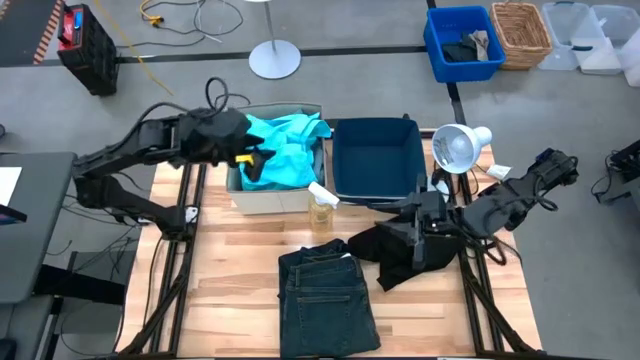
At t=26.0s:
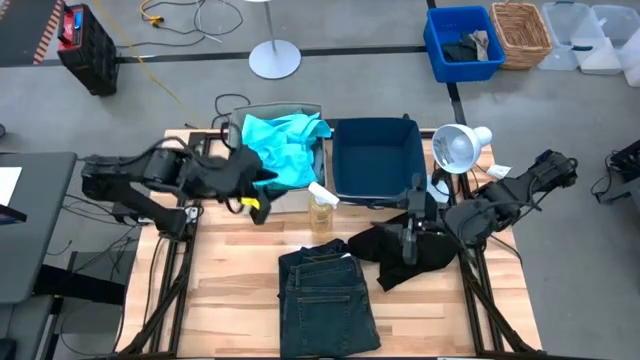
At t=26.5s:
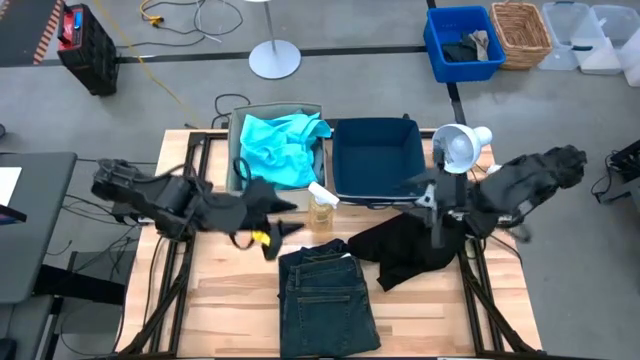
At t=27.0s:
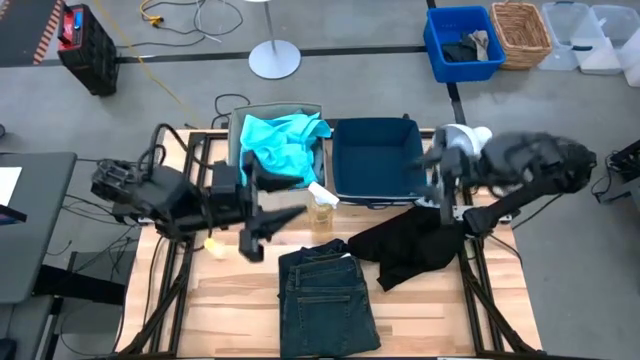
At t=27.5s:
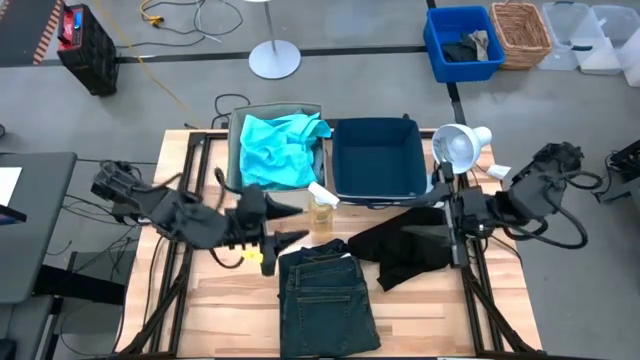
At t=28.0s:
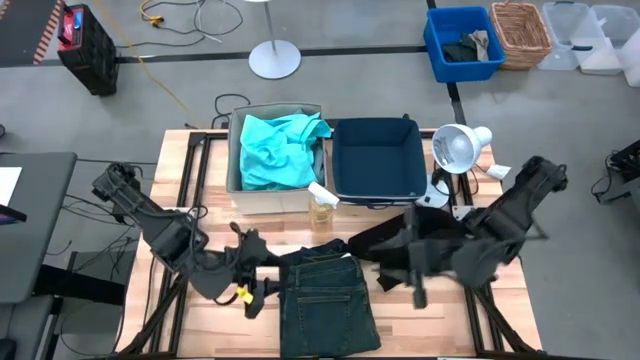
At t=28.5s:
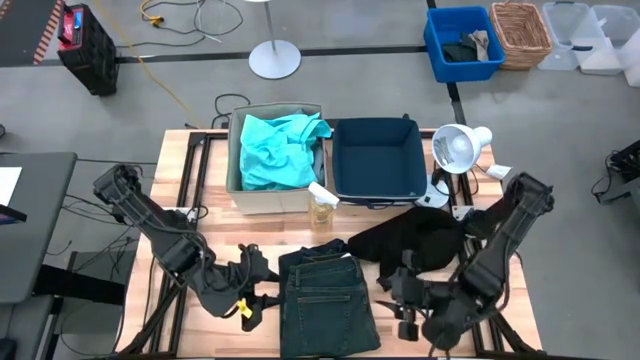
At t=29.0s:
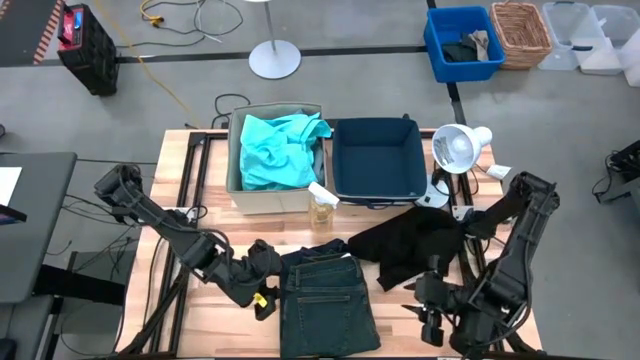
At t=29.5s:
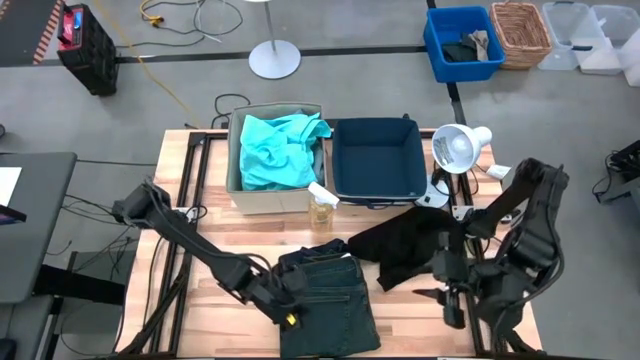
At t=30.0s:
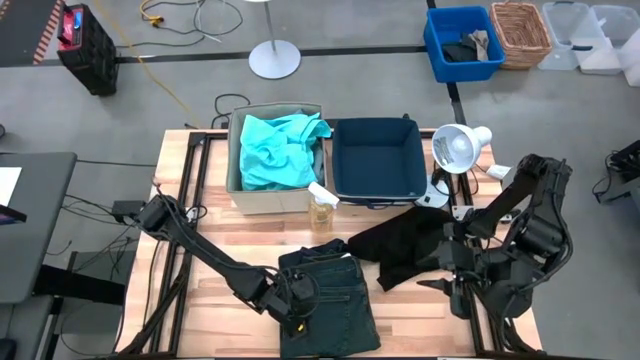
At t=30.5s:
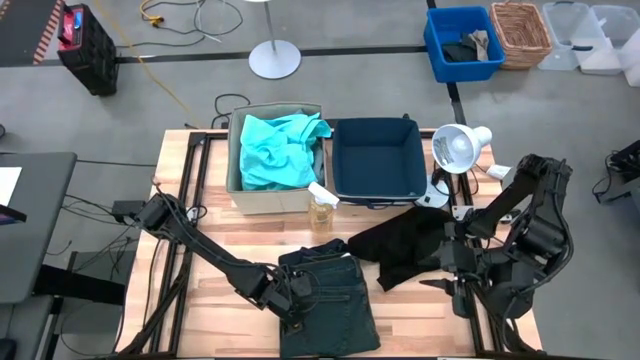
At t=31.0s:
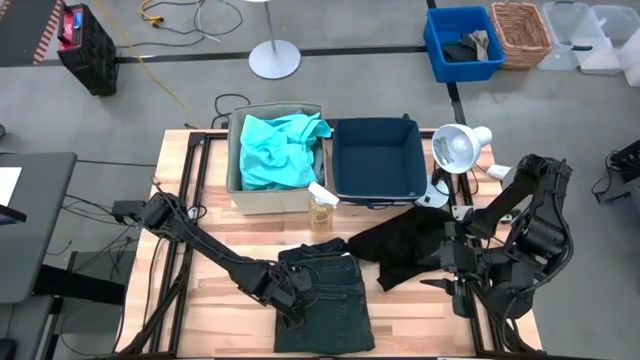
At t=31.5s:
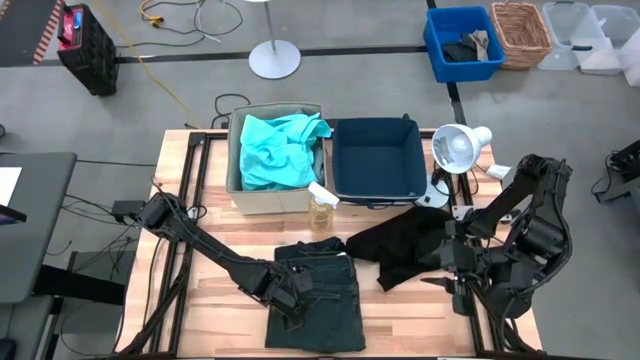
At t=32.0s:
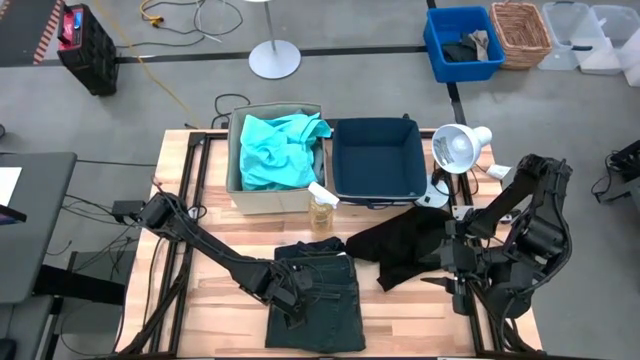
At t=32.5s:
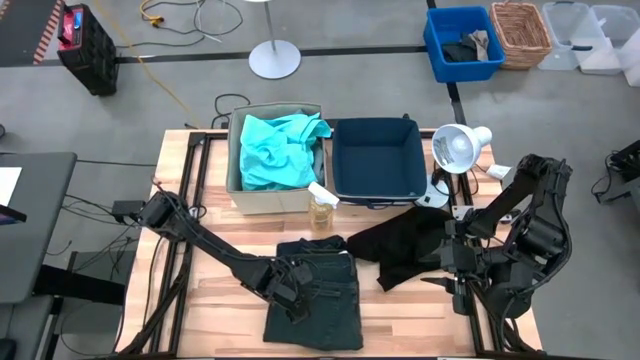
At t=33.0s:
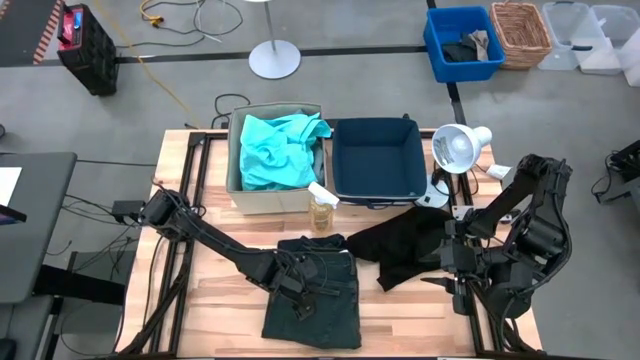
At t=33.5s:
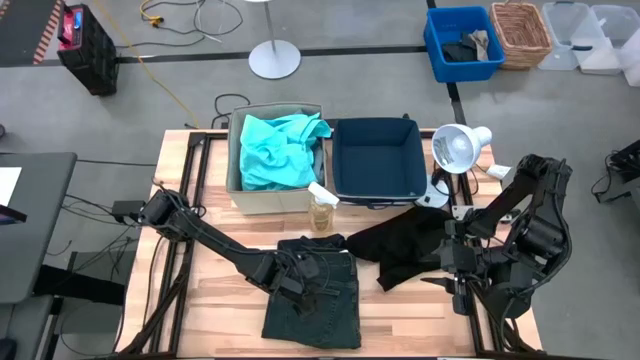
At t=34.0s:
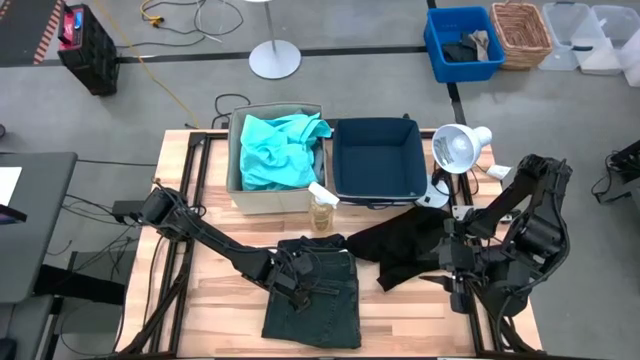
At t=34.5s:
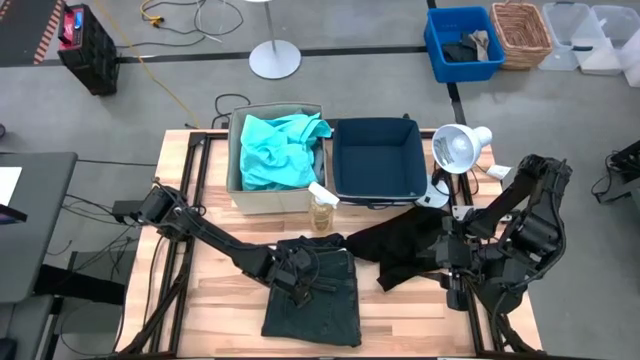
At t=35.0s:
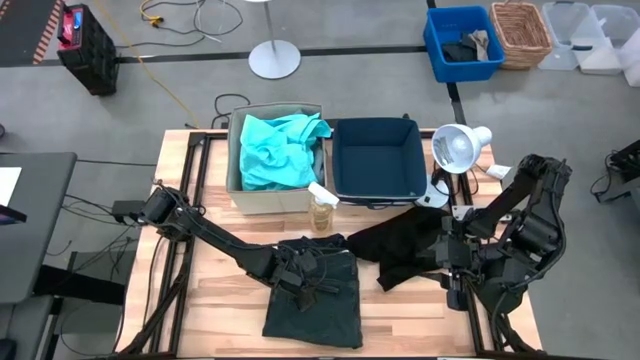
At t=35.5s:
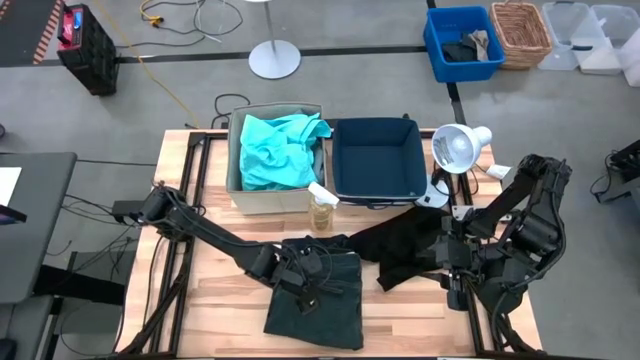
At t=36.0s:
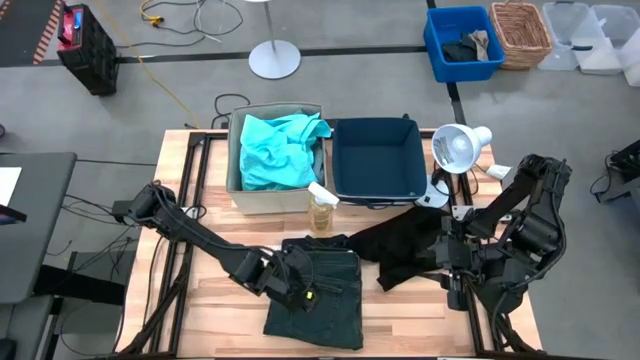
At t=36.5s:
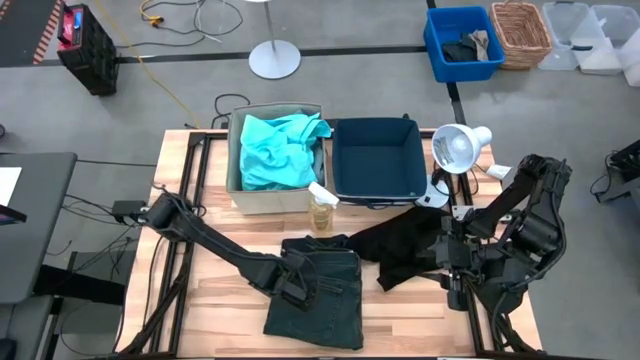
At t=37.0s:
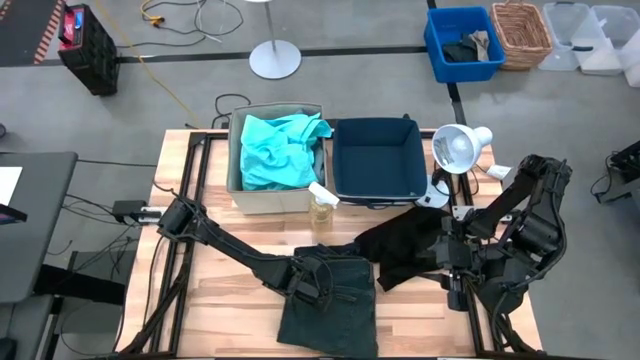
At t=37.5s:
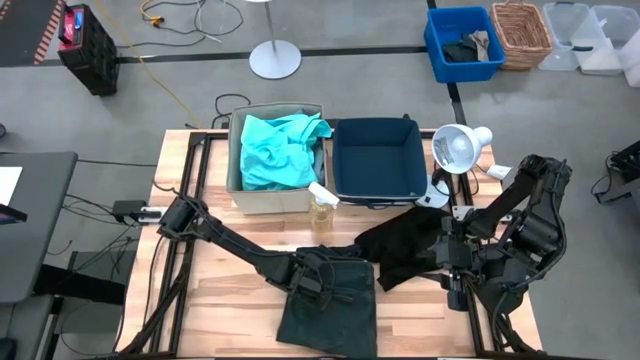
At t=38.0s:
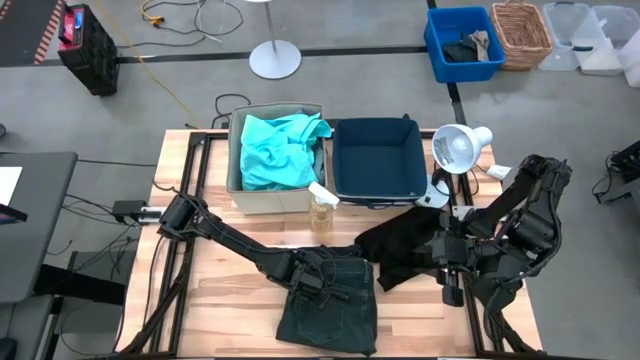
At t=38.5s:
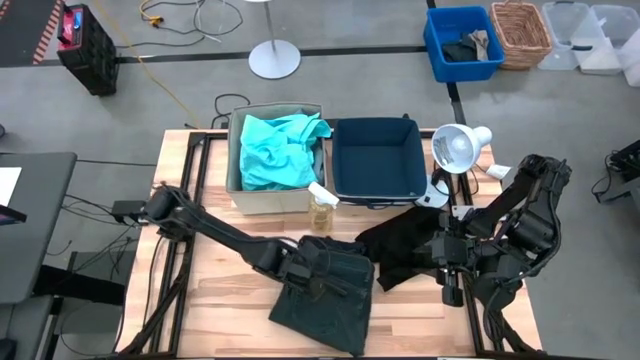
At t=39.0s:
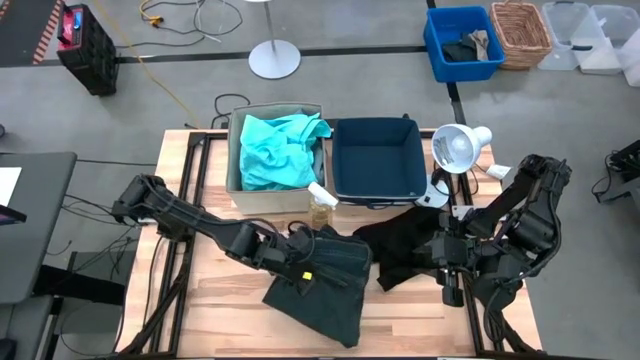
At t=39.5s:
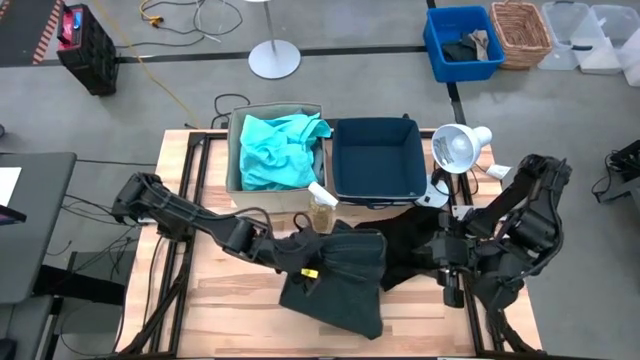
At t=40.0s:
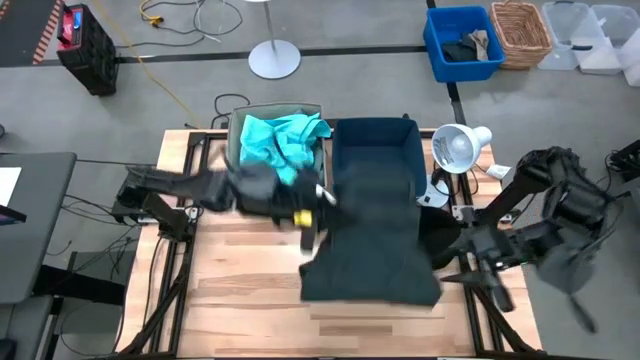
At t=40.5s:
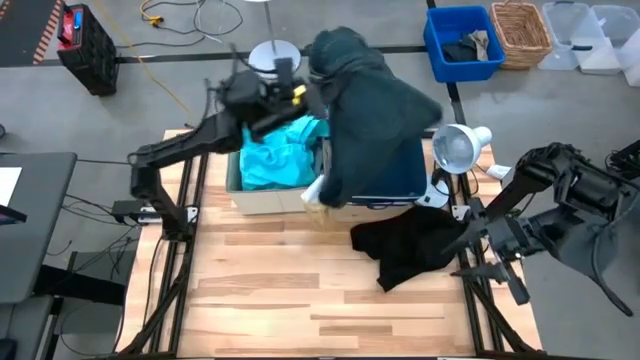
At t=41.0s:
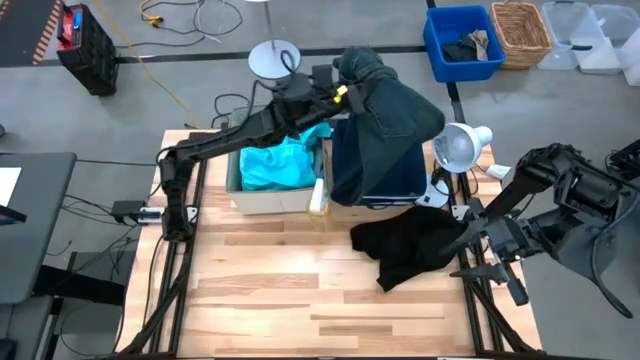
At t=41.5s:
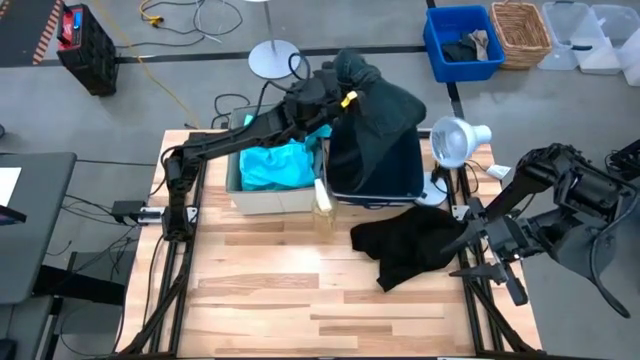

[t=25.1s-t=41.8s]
Task: Sort clothes
Put the dark blue pants into the blue laundry organizer

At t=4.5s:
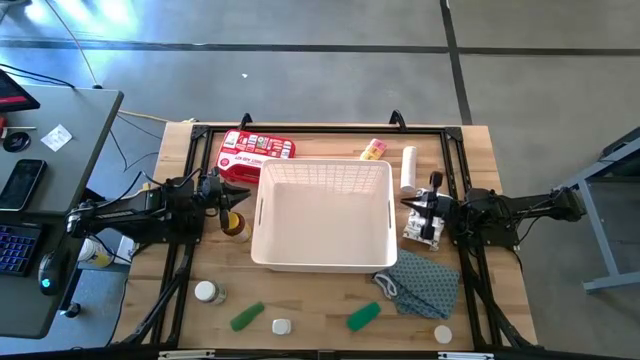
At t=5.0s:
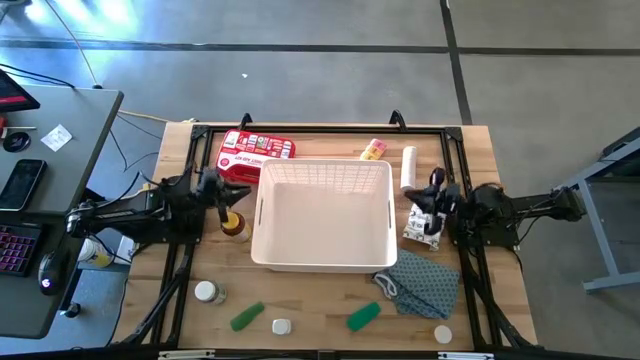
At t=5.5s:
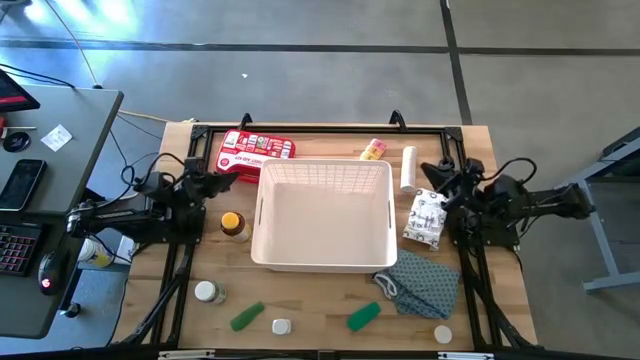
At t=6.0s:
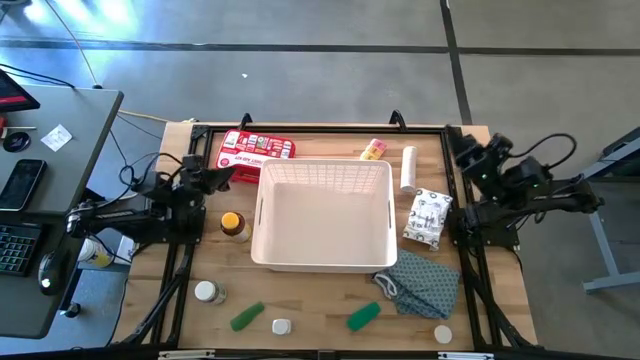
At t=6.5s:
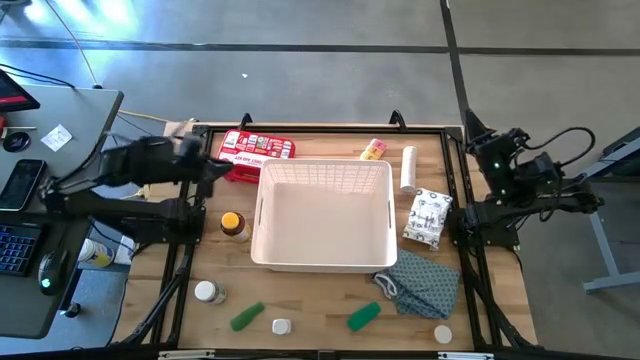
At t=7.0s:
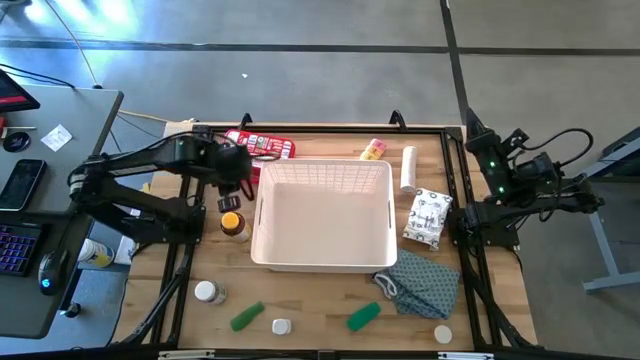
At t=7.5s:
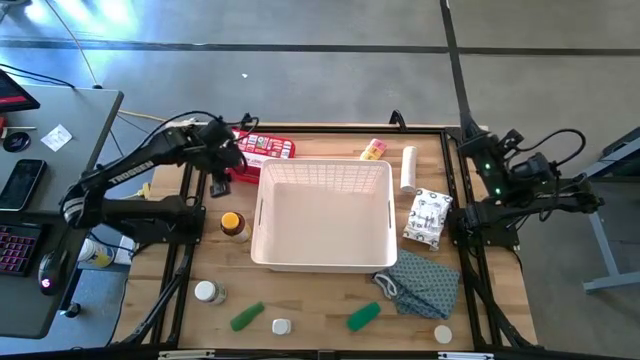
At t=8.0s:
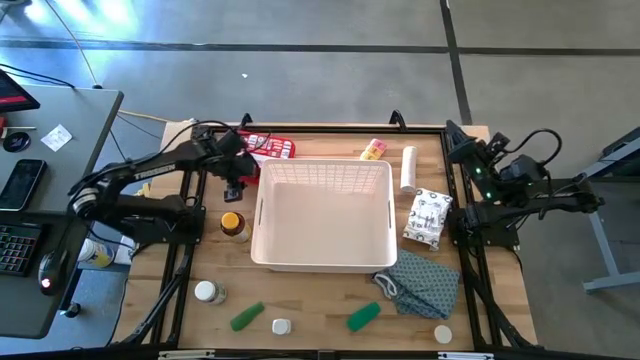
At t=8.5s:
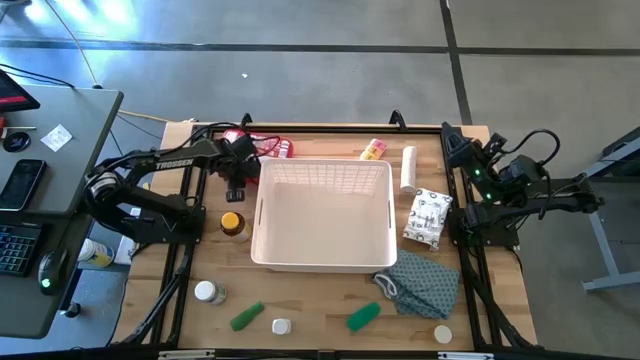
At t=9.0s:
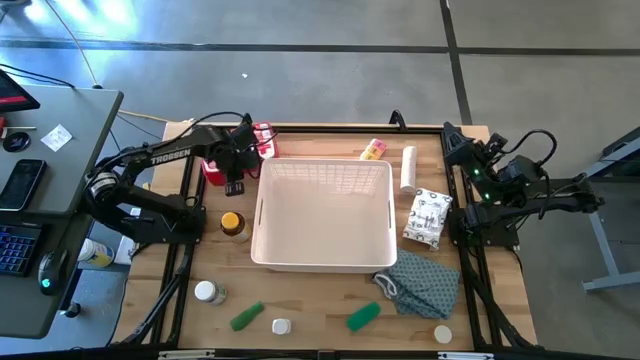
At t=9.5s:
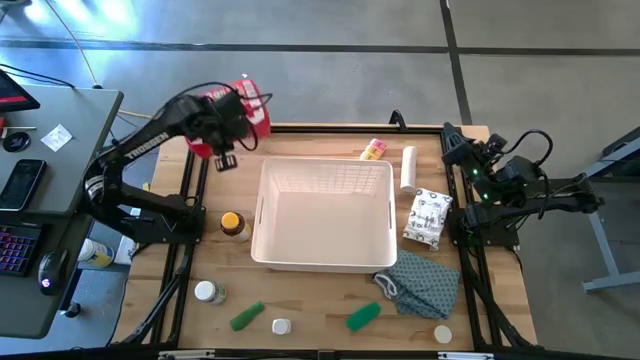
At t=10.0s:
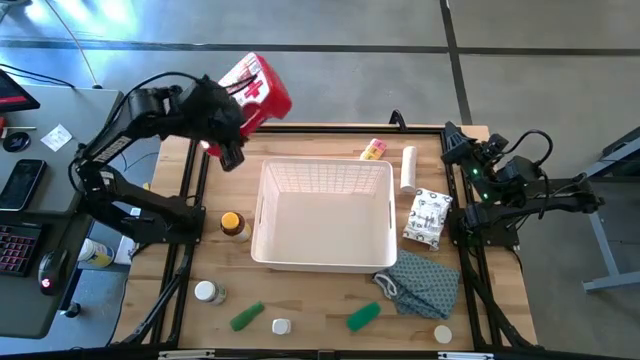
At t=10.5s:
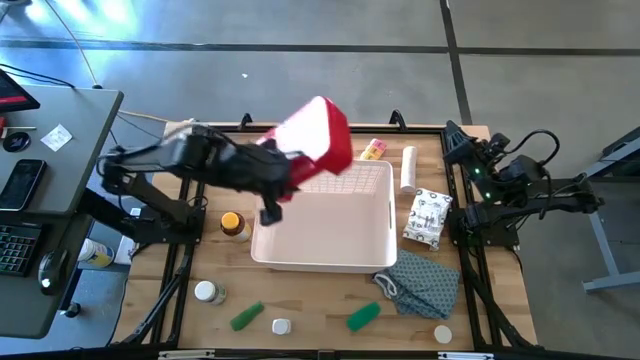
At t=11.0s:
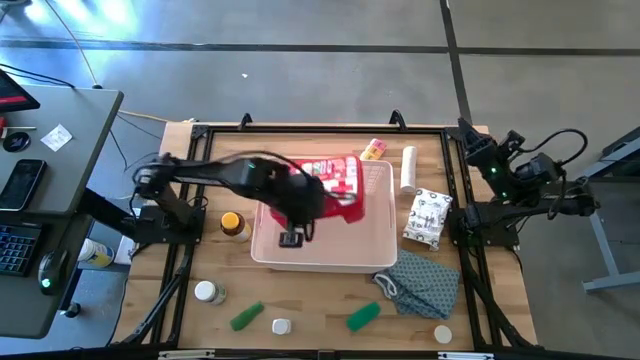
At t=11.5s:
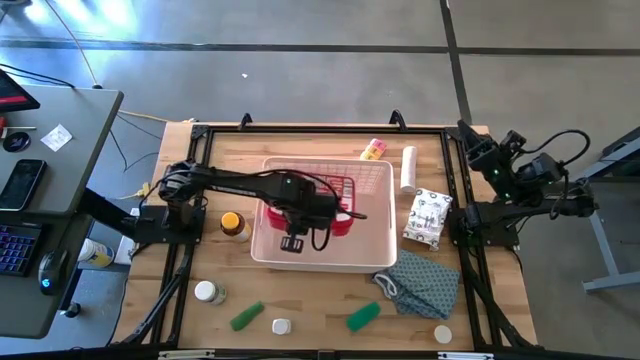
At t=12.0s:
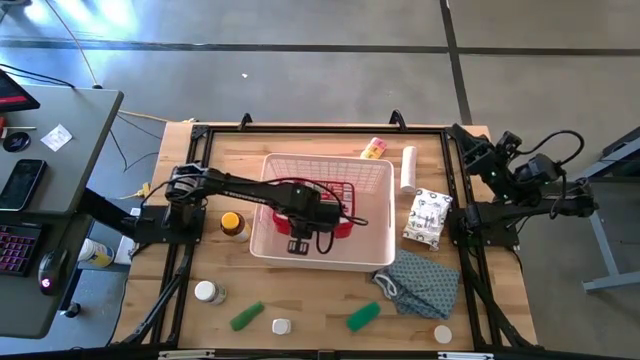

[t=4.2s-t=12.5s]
Task: Pick & place medical supplies in basket/bin
Put the red first aid kit box into the white container
